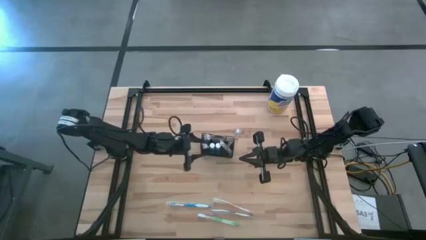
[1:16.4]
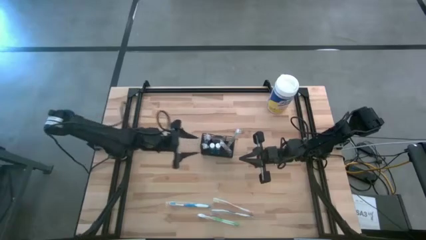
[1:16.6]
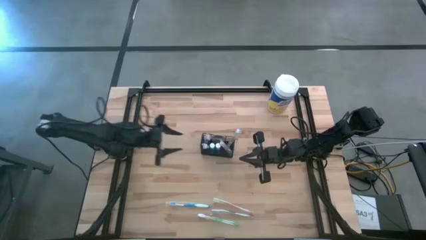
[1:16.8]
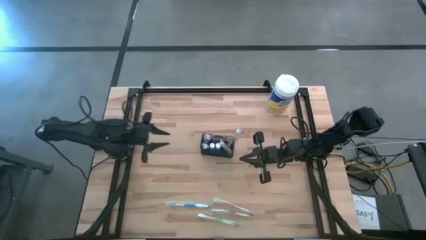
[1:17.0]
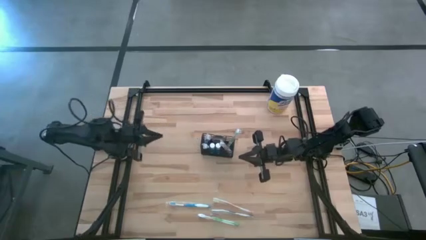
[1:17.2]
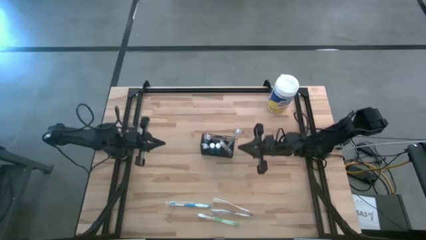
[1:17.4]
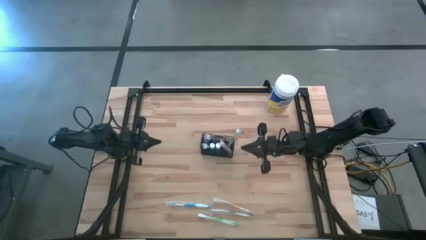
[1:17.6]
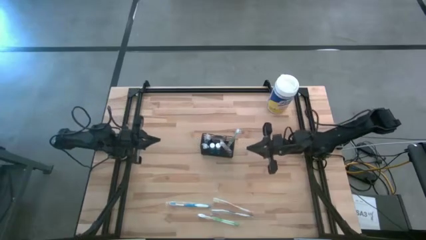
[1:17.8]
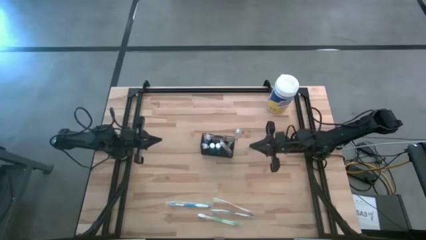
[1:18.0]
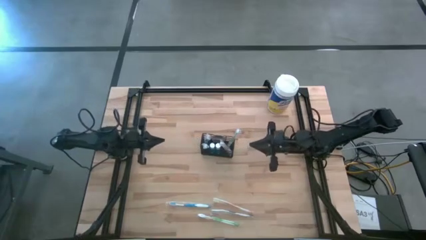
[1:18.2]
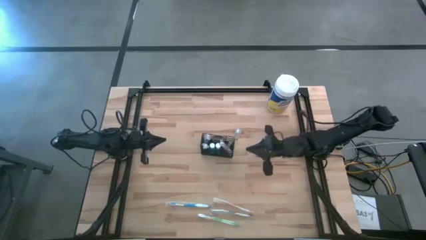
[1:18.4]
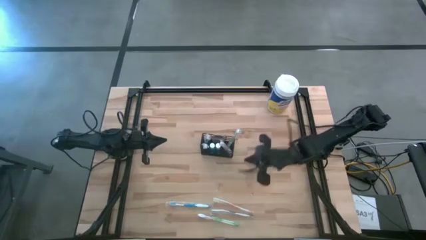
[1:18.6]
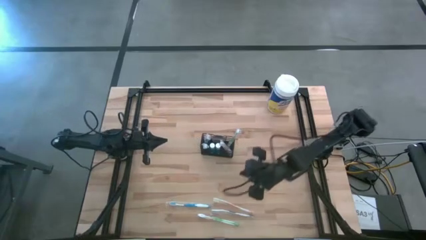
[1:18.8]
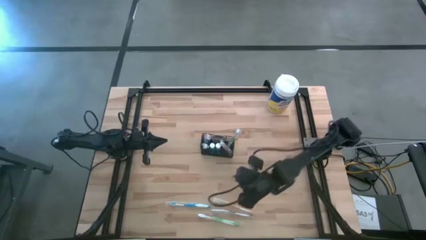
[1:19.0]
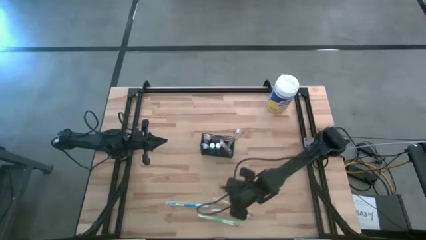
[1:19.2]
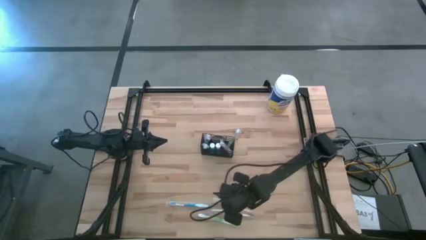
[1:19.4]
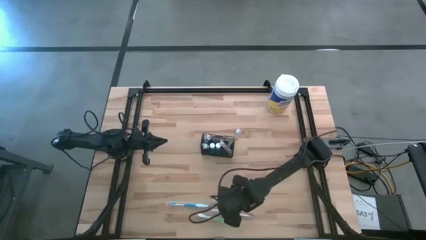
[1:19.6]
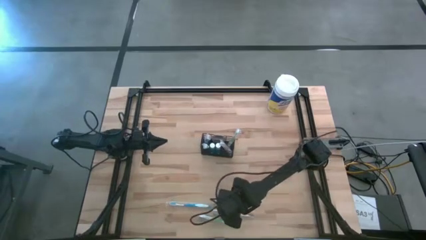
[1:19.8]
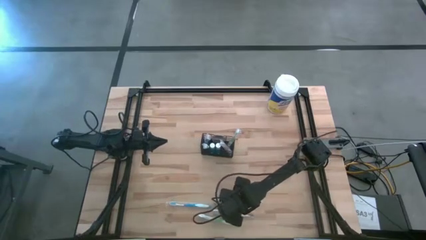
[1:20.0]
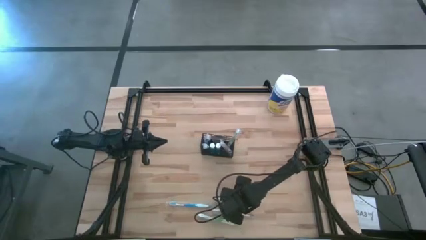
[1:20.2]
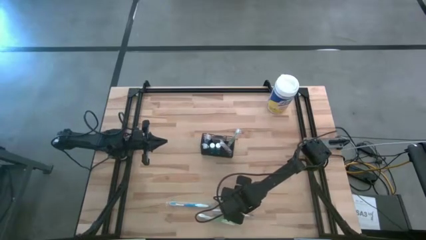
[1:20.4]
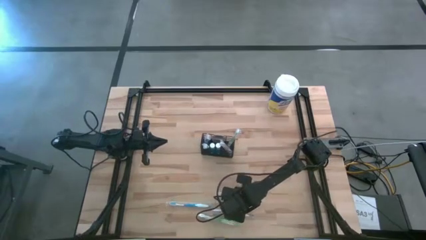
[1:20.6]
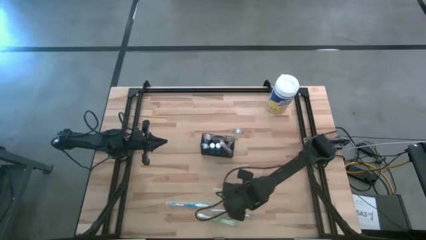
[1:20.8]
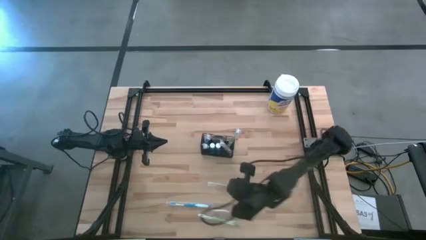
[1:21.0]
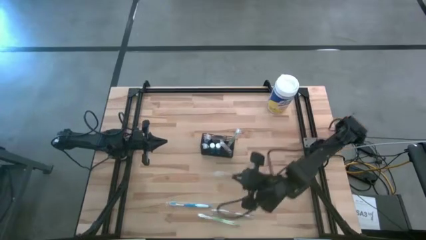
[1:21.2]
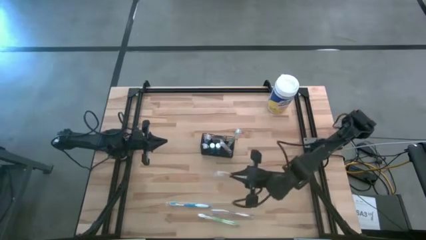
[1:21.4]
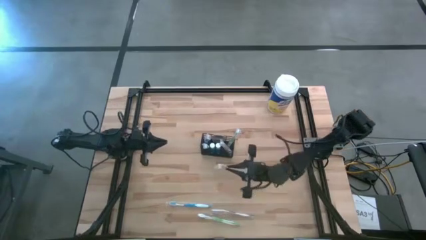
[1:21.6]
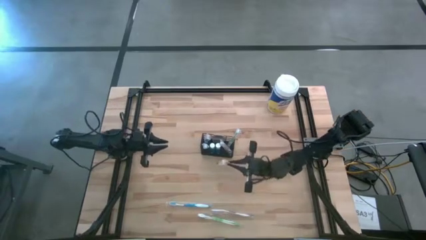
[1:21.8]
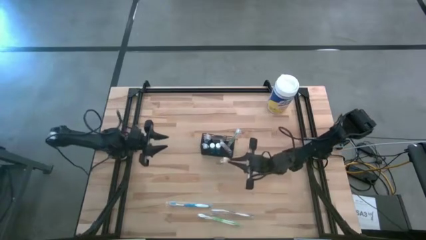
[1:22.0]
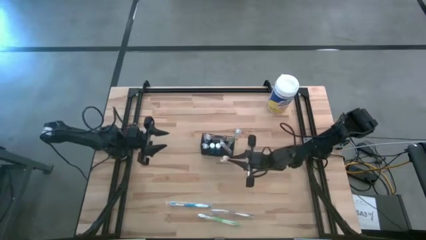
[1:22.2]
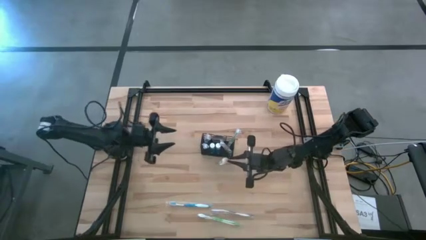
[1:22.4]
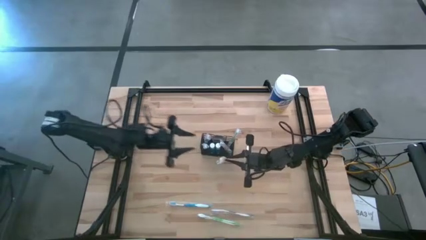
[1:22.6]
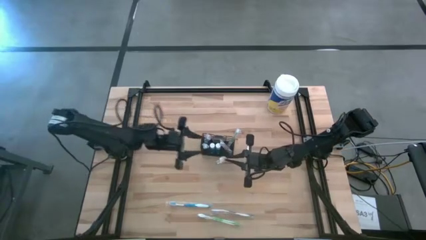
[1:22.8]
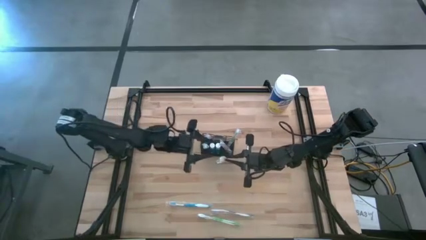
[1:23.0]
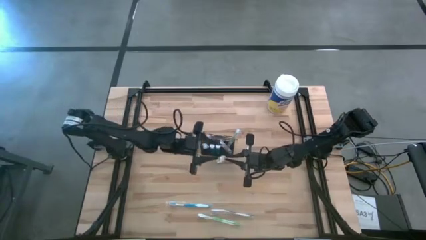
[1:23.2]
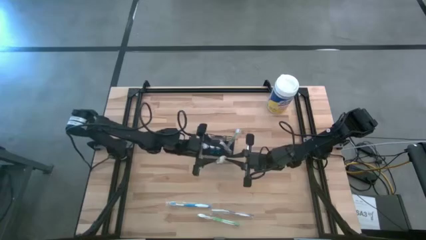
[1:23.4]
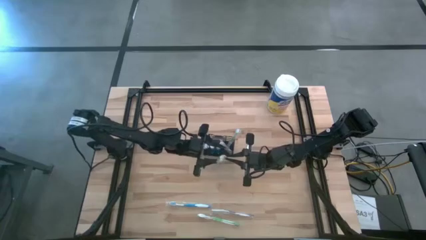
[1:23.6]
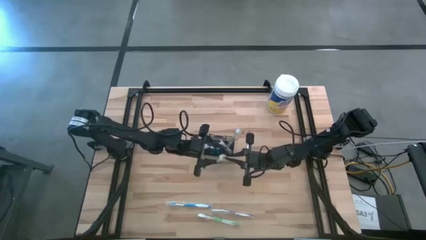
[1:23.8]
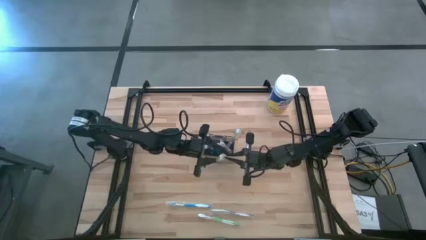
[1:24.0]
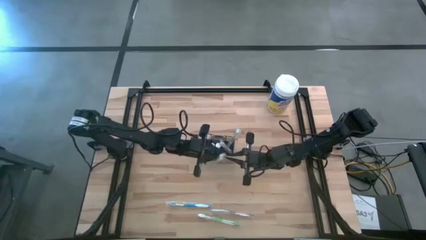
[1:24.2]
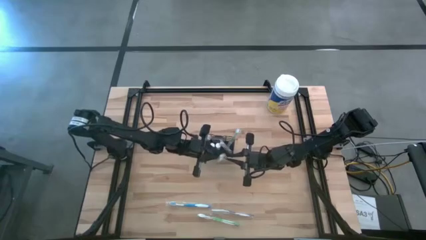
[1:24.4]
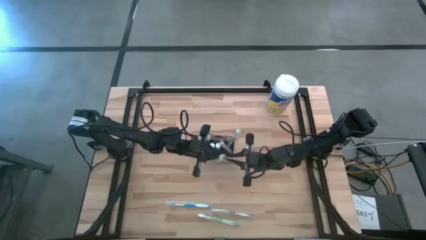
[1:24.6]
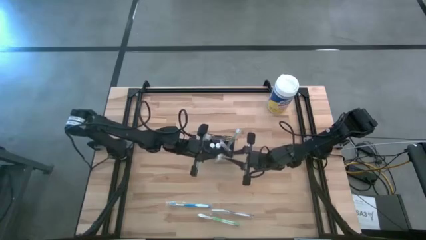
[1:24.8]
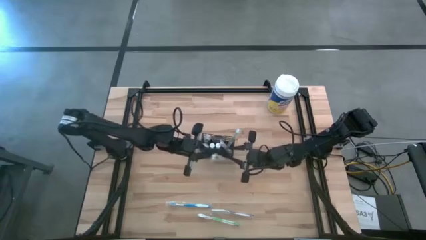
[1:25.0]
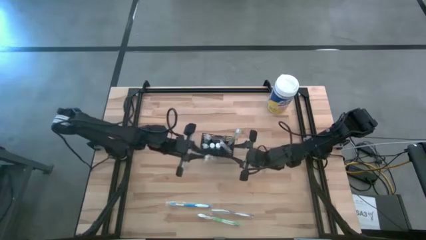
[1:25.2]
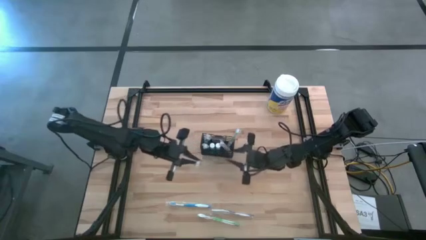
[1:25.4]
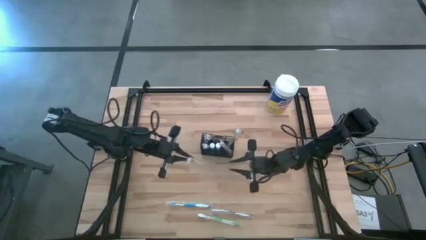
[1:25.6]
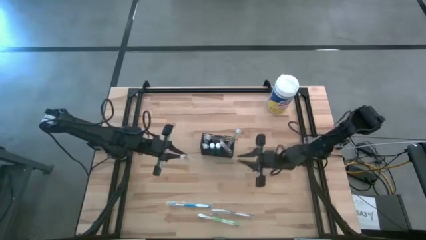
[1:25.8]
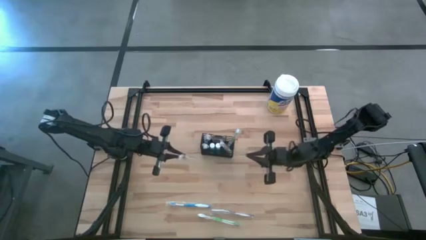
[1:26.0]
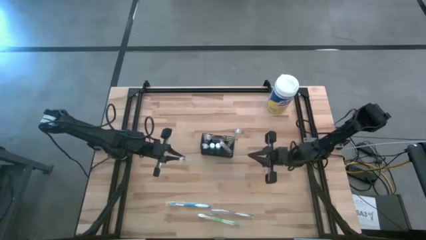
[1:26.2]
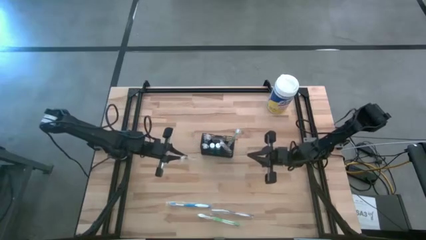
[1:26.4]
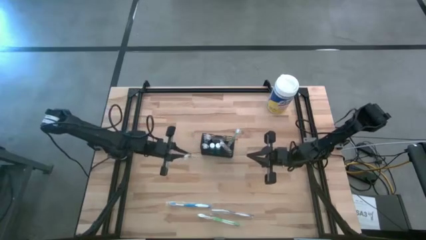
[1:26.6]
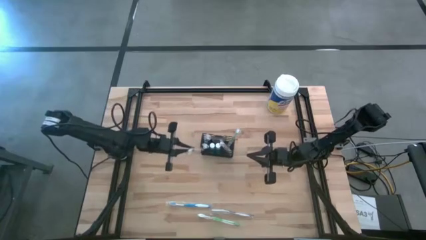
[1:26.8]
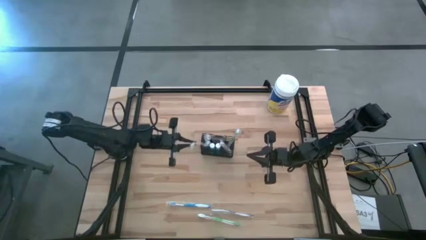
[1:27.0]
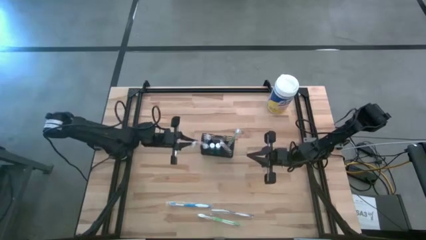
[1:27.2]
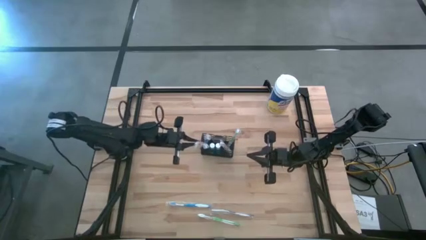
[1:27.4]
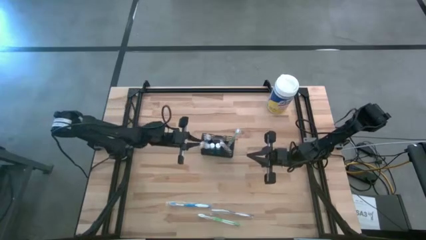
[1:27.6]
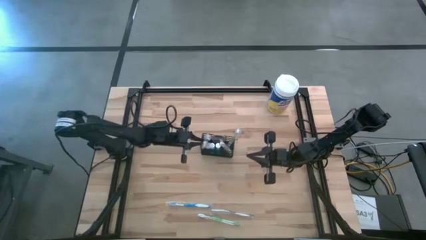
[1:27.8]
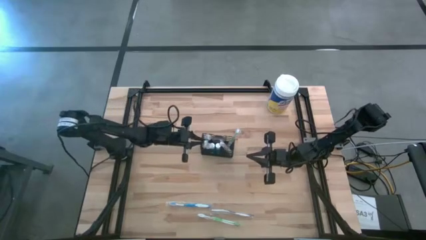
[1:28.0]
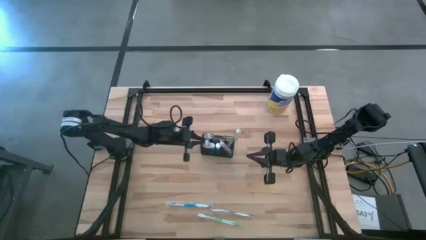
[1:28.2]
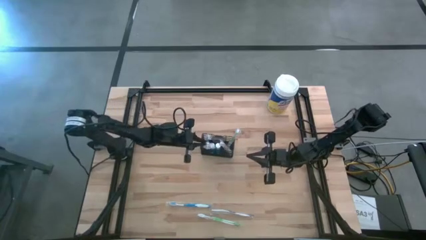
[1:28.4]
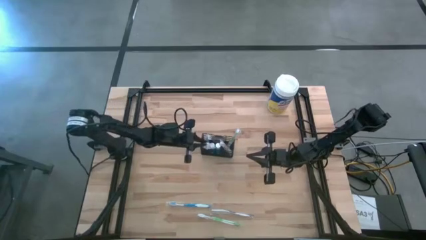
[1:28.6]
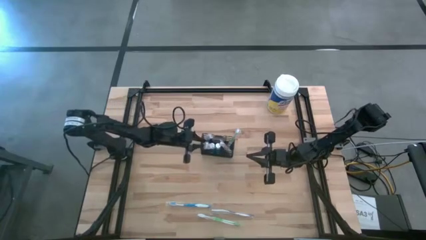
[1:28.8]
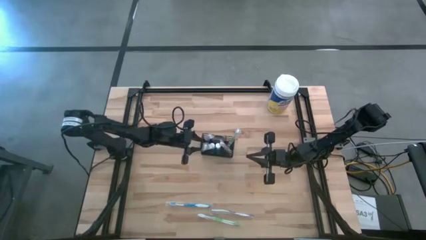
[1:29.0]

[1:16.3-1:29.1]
Task: Pick & Place toothbrushing station
Put the orange toothbrush into the wire organizer

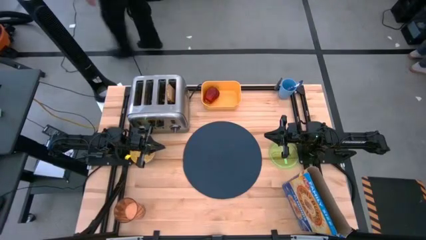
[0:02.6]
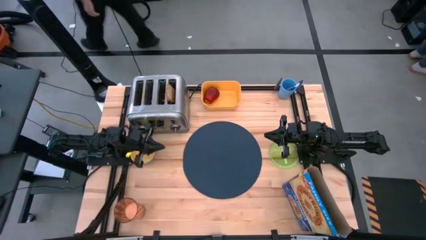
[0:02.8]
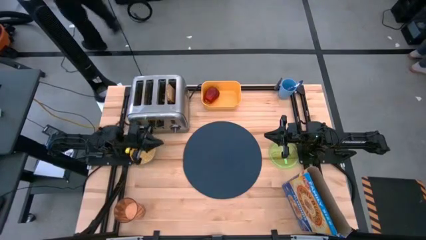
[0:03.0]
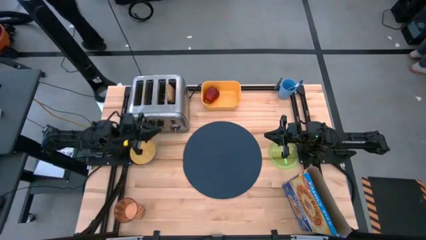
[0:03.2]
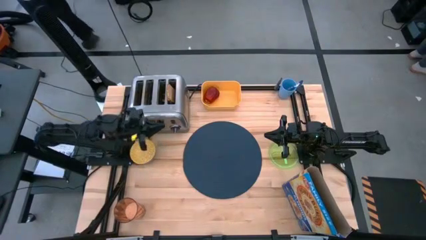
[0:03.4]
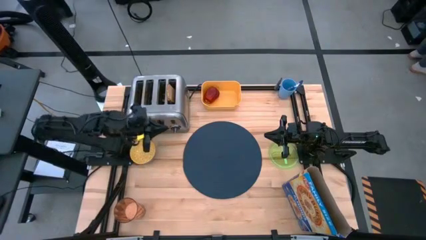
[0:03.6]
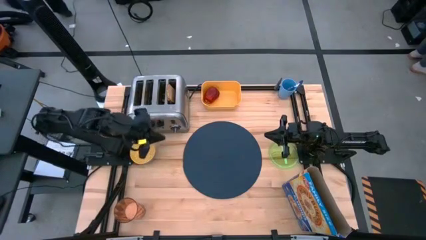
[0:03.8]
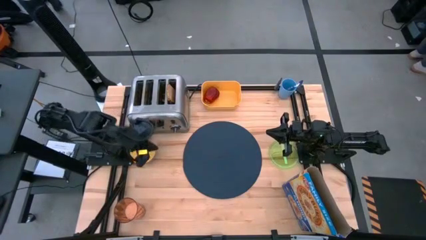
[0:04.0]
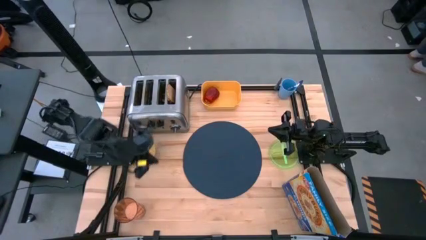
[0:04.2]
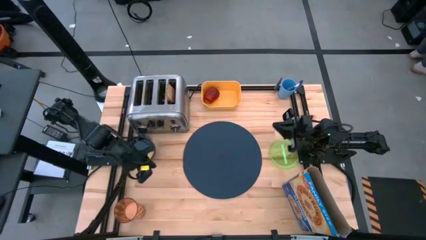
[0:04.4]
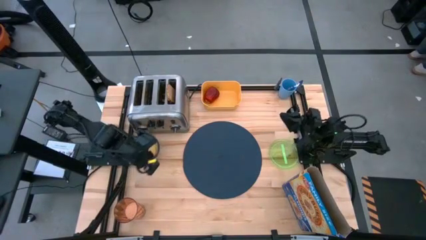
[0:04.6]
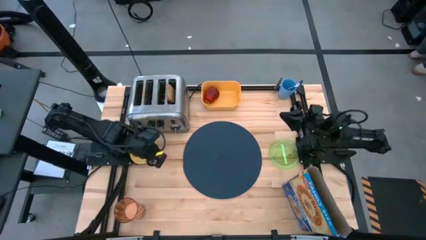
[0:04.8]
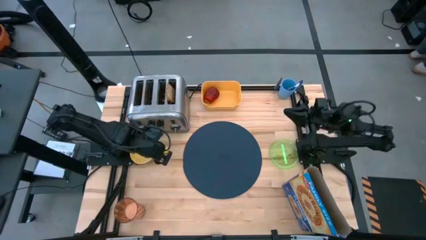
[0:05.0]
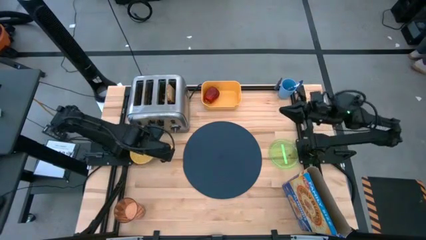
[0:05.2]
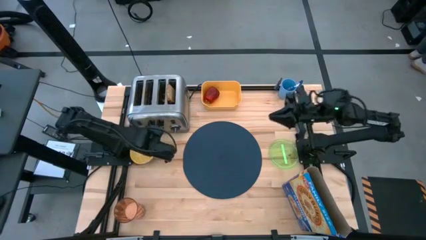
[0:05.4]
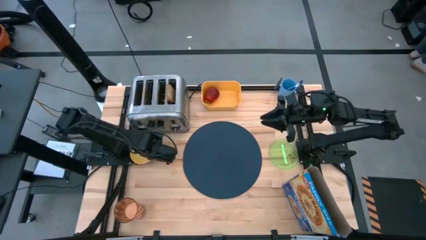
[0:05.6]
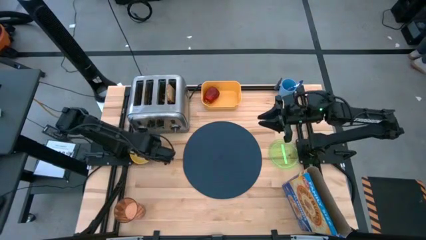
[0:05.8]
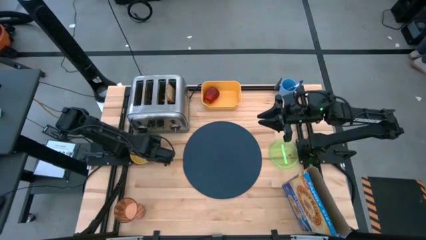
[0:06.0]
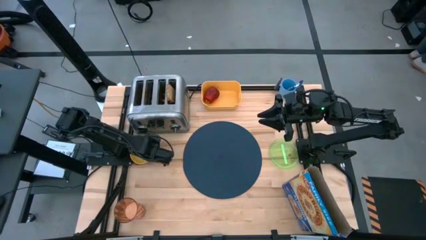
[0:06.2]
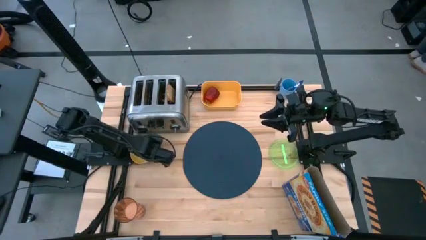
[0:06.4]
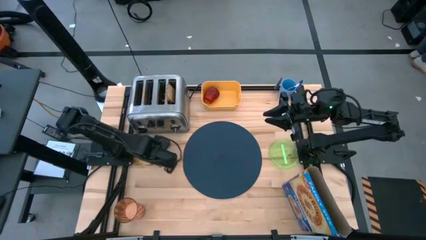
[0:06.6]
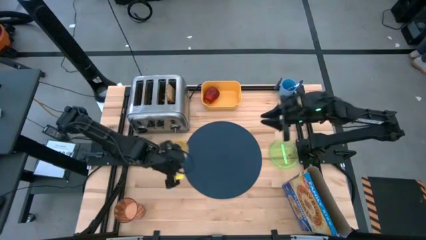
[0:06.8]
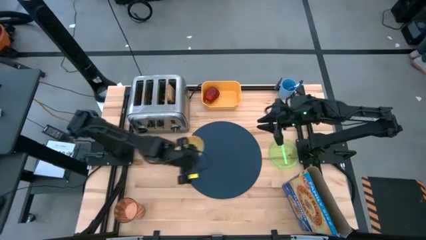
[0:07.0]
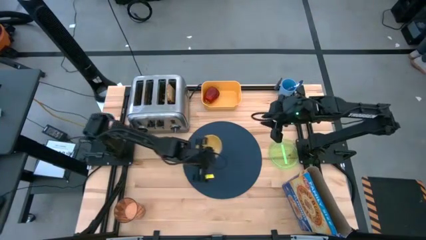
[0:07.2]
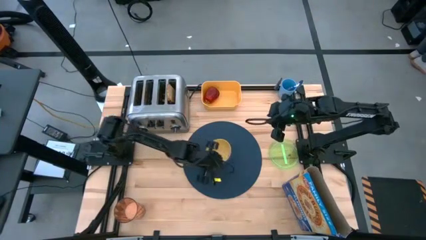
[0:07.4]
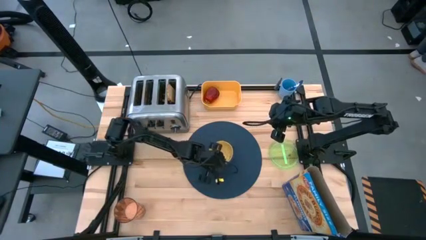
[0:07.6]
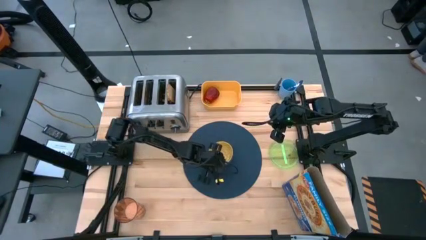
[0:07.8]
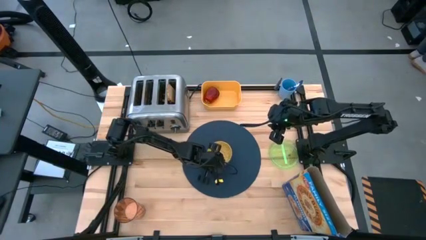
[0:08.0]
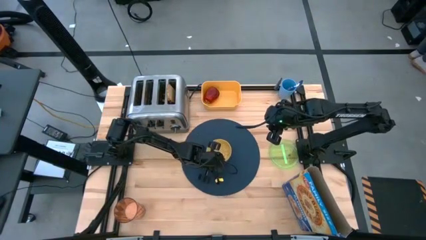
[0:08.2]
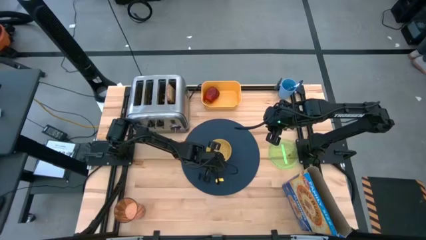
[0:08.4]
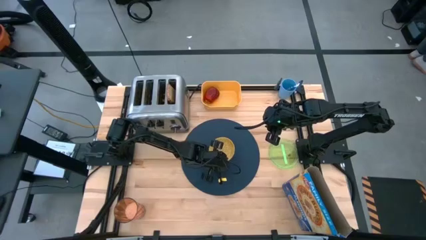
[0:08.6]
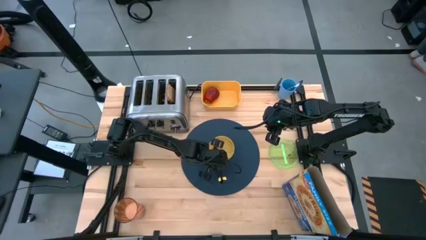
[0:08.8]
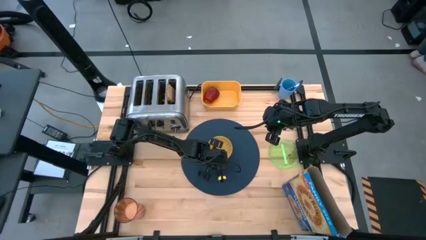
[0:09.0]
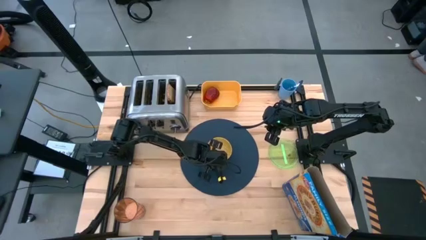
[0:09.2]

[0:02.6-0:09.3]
Task: Arrange a breakfast setting
Put the yellow bowl on the center of the table mat
